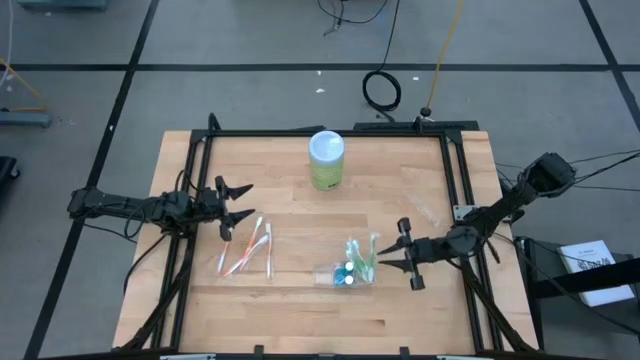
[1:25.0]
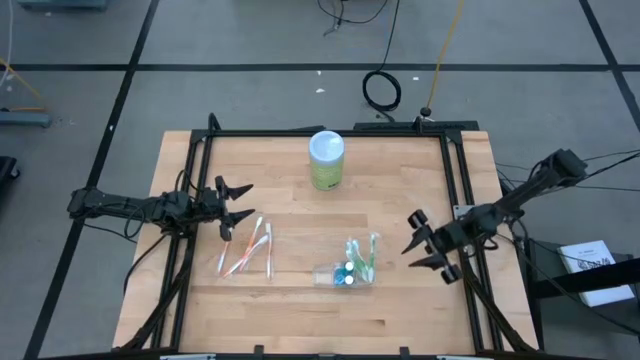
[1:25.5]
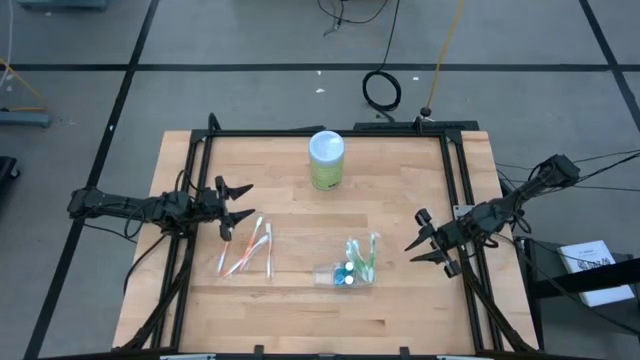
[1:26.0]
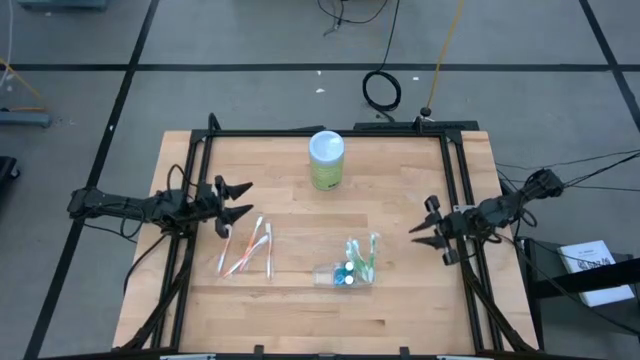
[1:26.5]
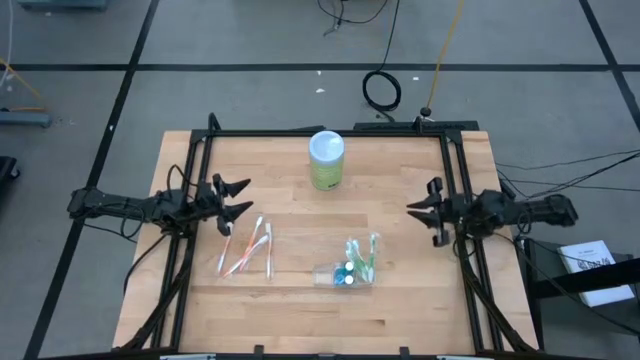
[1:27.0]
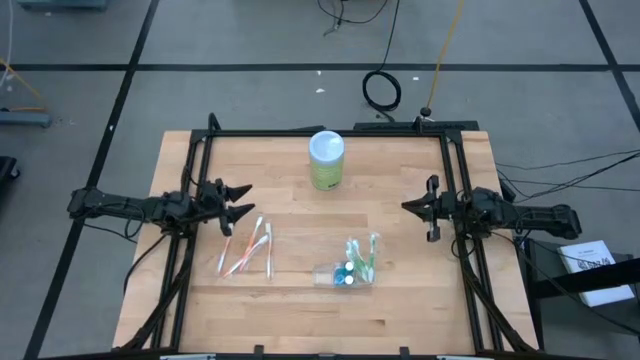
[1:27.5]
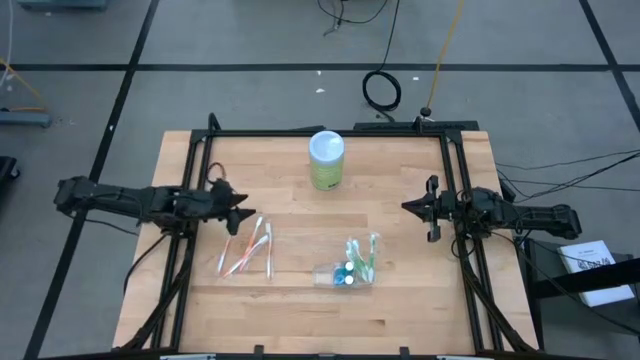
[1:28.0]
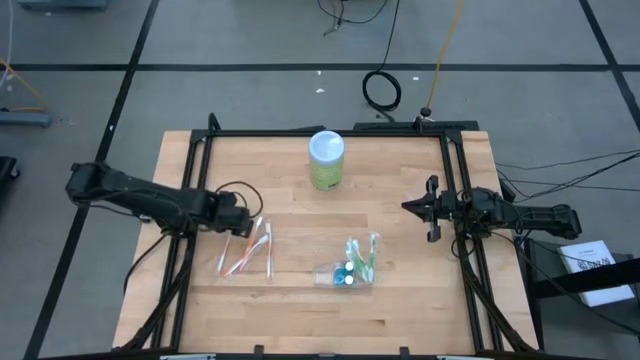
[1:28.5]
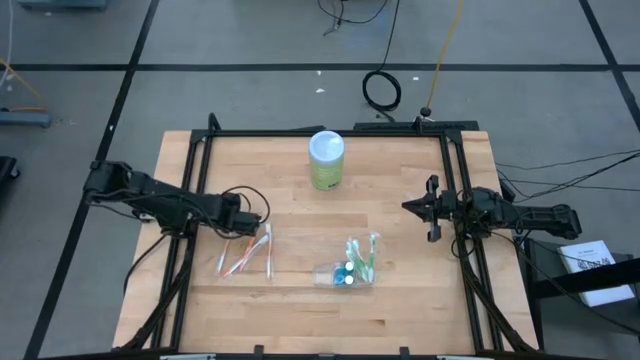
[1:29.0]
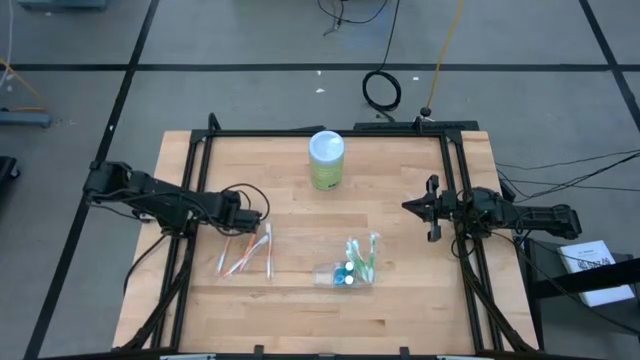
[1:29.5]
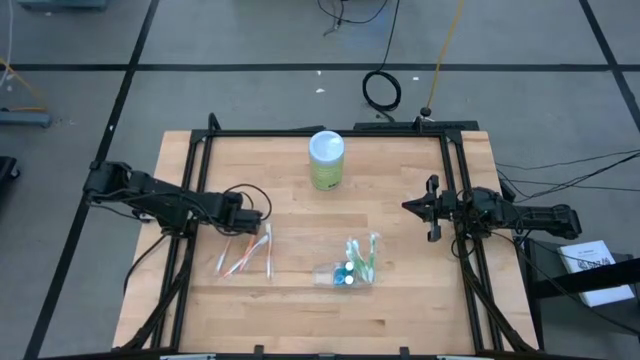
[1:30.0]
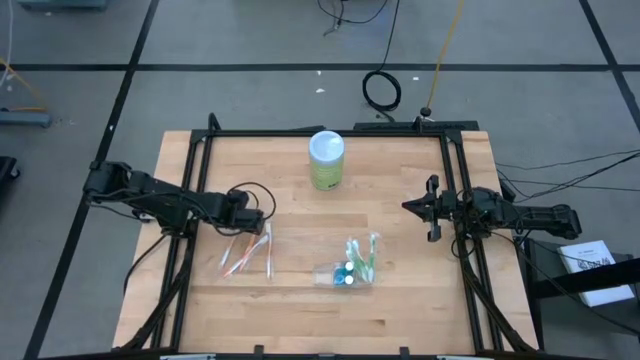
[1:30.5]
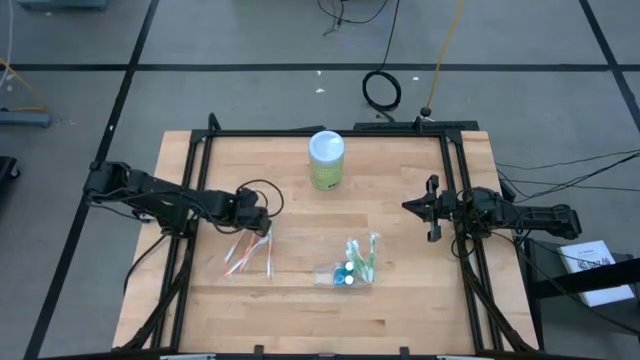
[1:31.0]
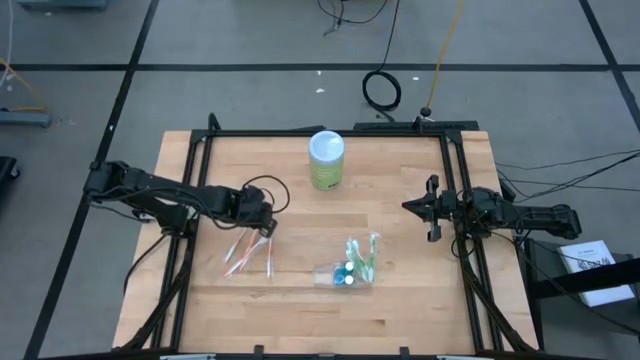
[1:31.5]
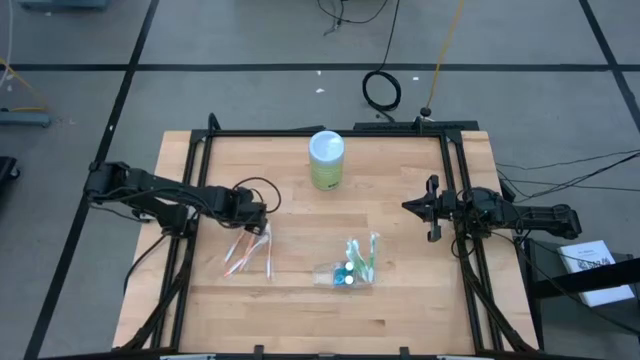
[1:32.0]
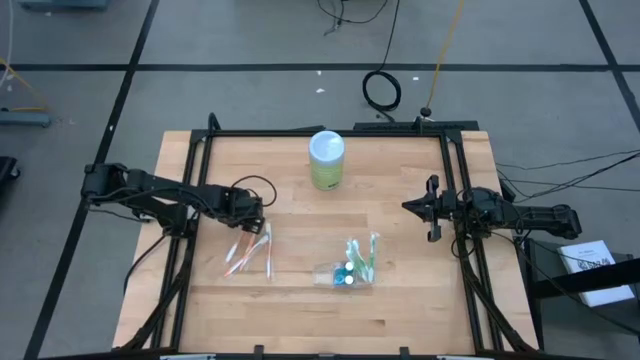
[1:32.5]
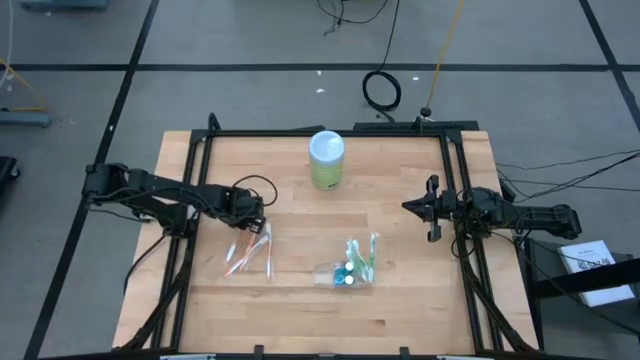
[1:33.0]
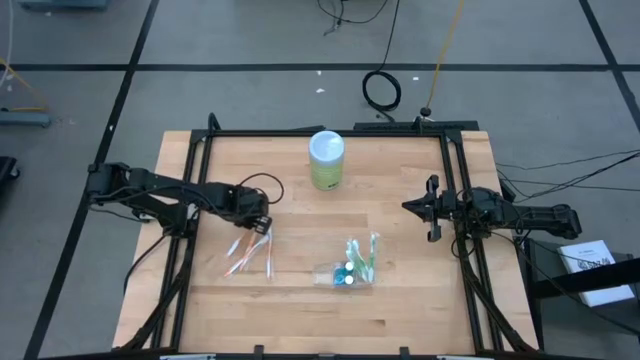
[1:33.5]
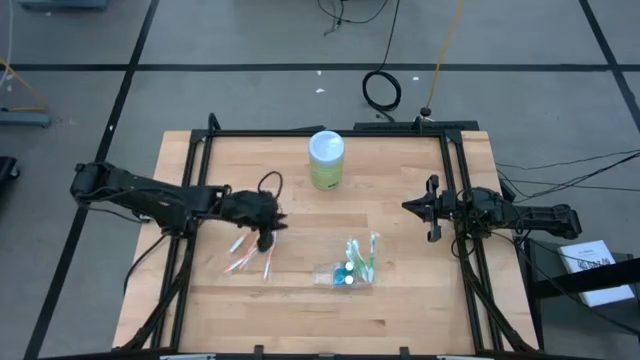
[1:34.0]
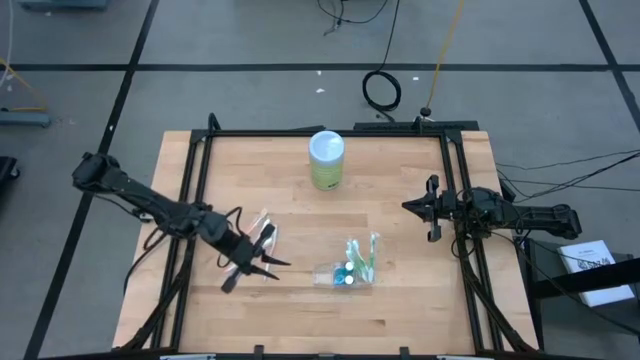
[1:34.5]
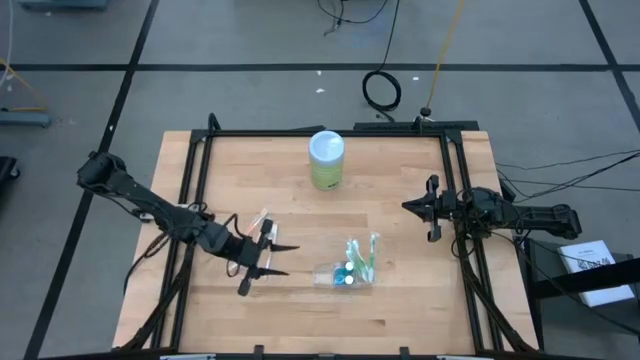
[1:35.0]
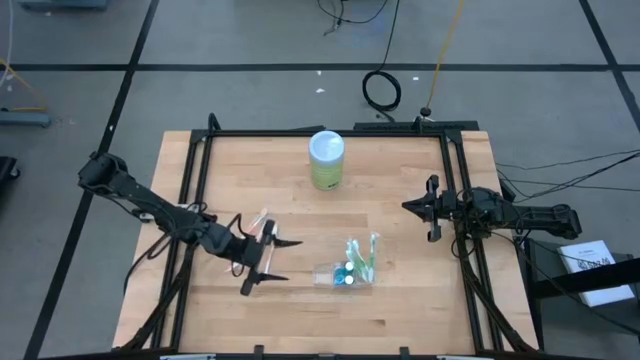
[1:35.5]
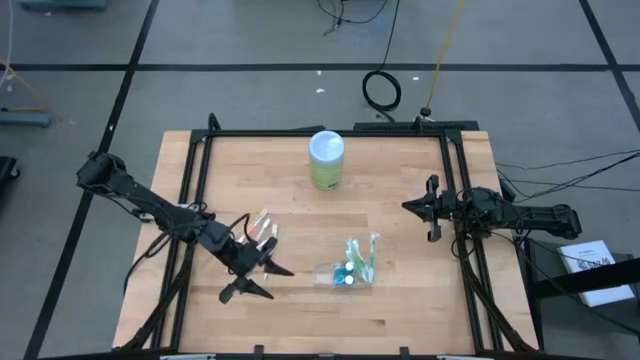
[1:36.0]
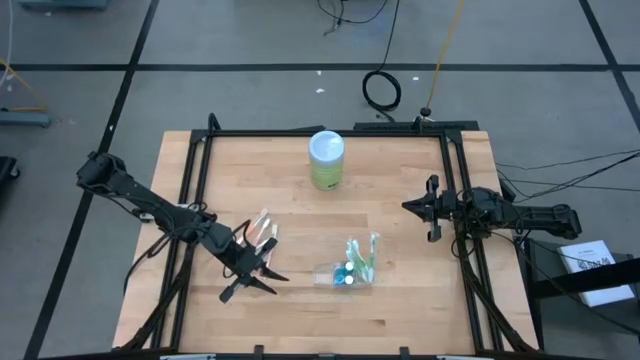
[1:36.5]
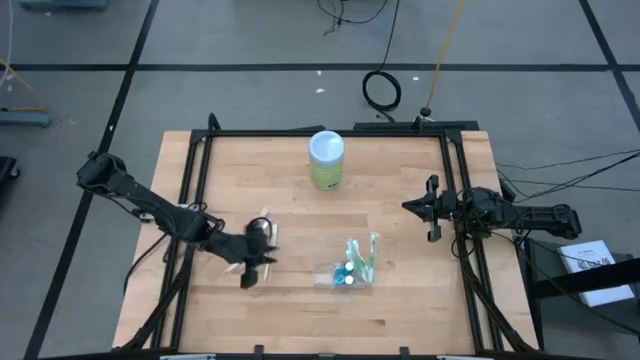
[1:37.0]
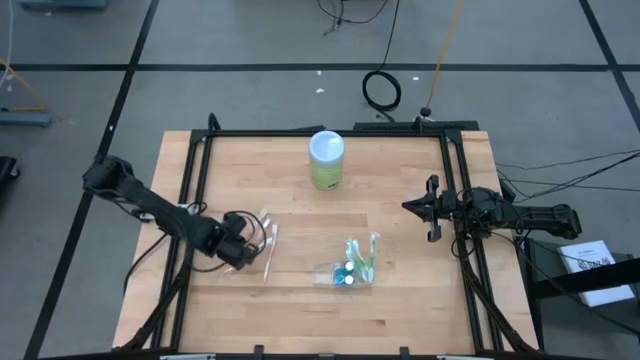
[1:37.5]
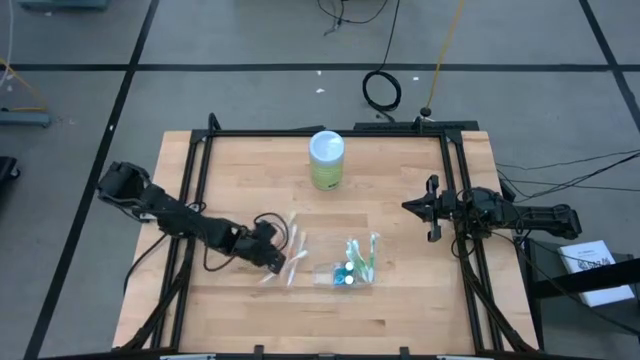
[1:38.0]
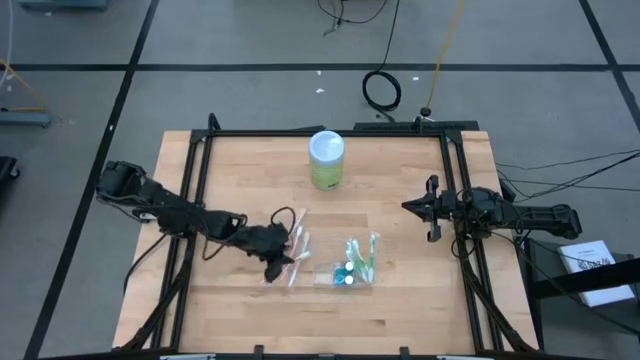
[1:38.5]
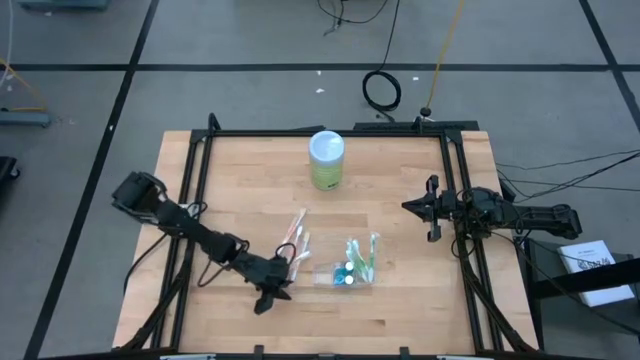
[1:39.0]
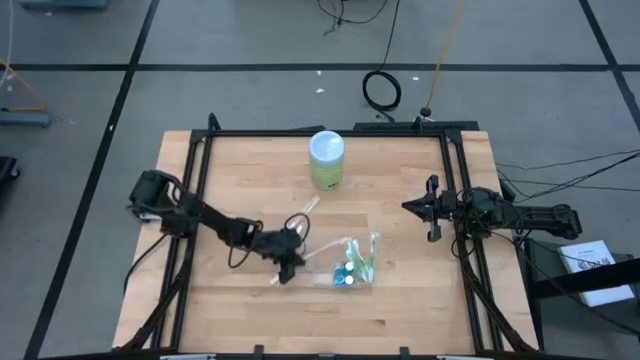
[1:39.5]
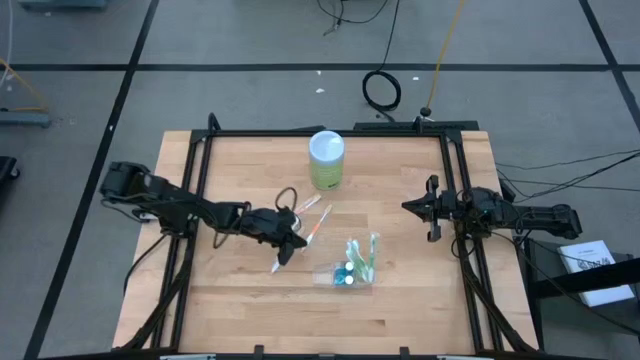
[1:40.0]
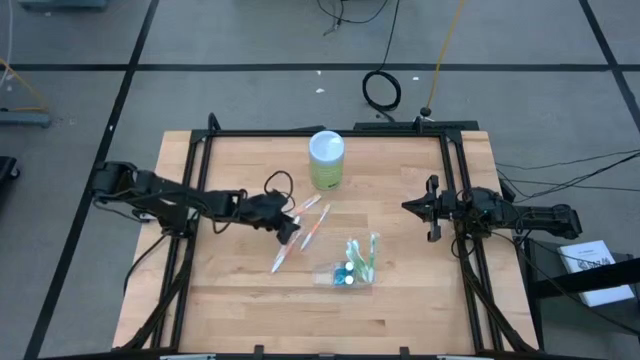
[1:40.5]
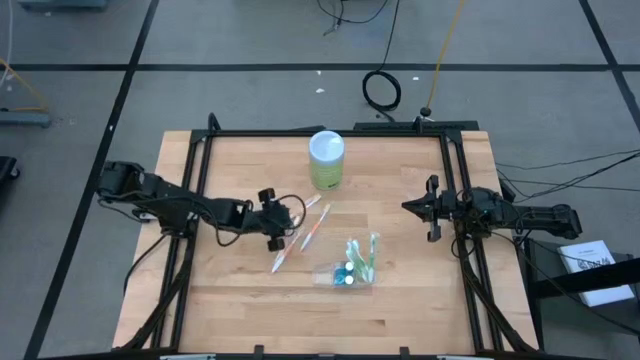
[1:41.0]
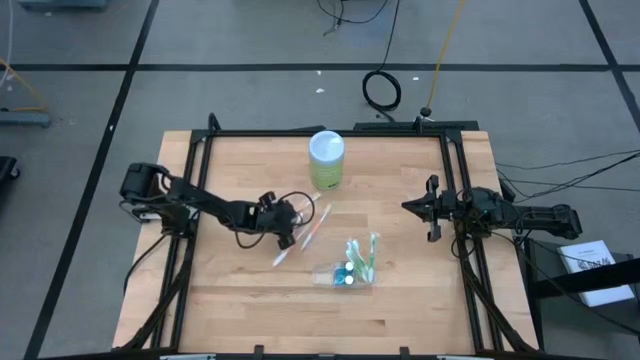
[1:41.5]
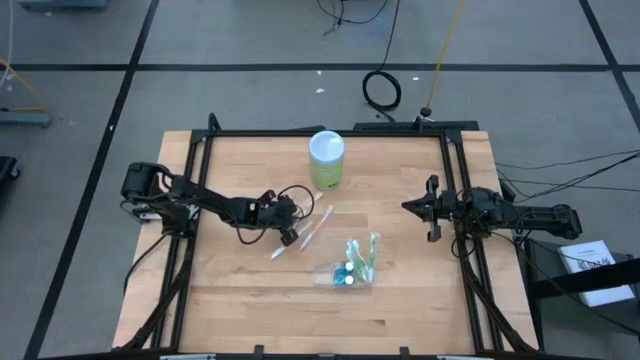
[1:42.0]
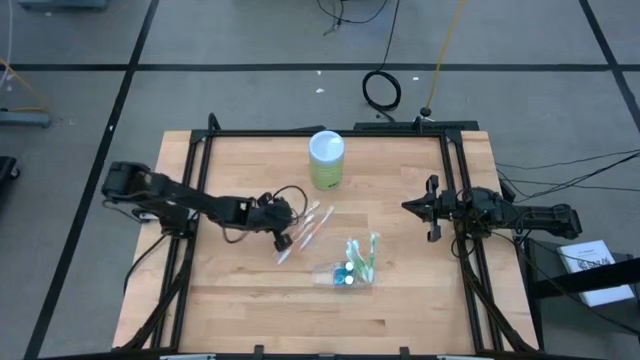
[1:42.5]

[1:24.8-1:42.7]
Task: Pick & Place toothbrushing station
Put the orange toothbrush into the left section of the transparent organizer

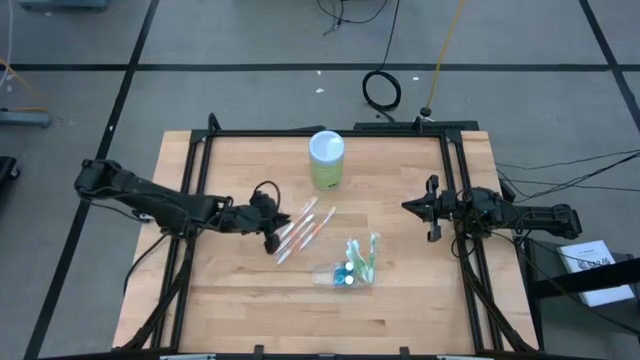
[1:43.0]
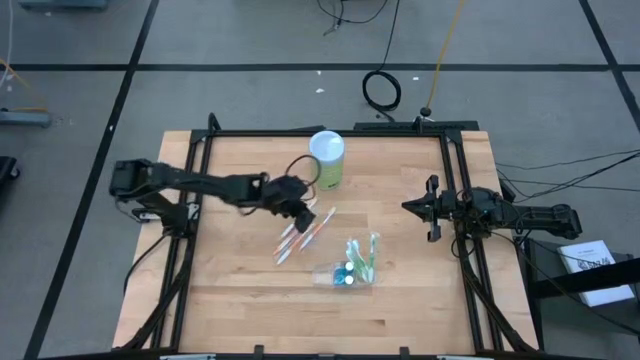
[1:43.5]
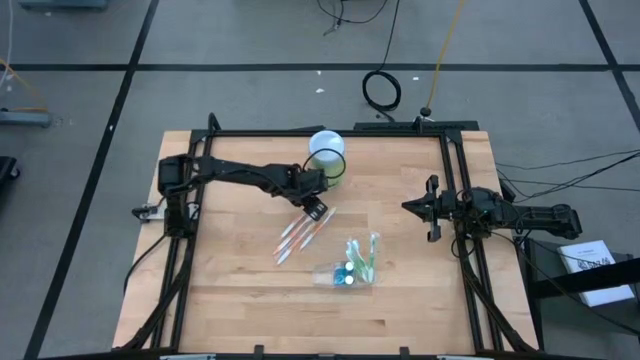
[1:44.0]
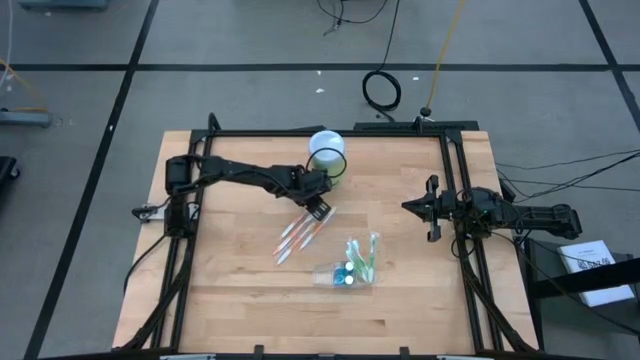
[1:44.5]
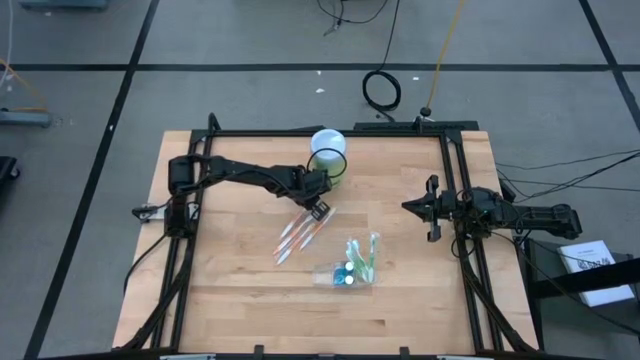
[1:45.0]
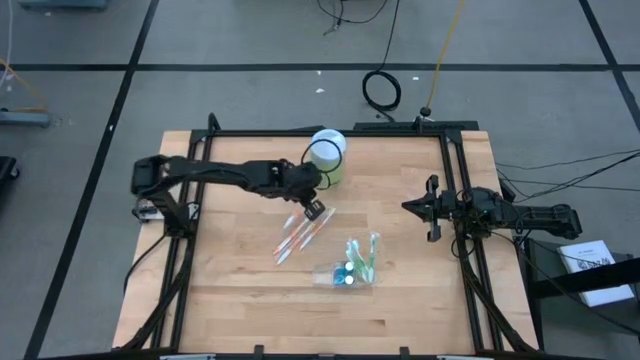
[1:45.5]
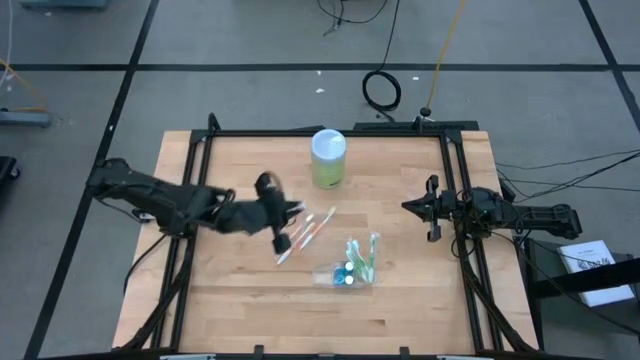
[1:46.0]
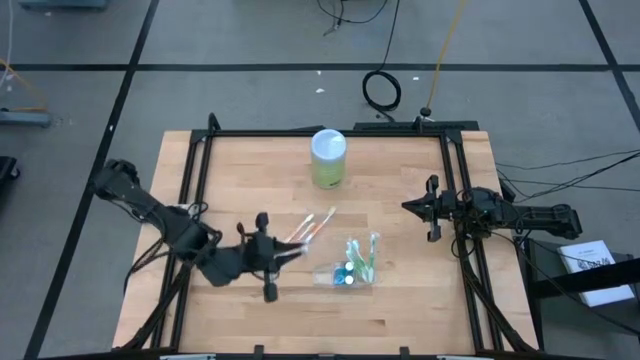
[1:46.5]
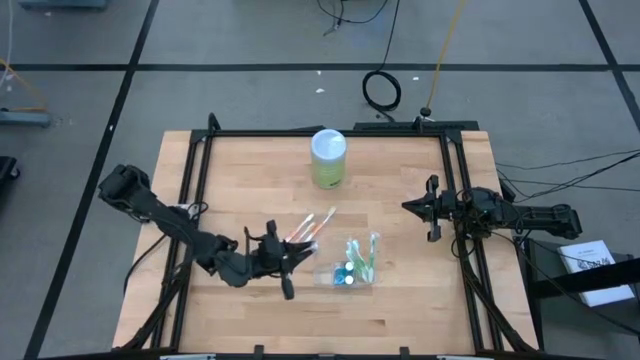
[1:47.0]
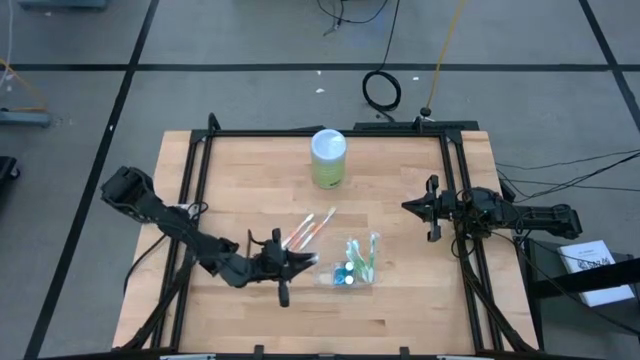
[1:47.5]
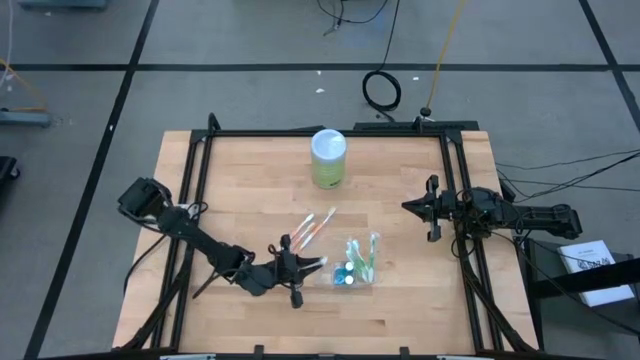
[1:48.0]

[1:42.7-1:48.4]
Put the orange toothbrush into the left section of the transparent organizer
